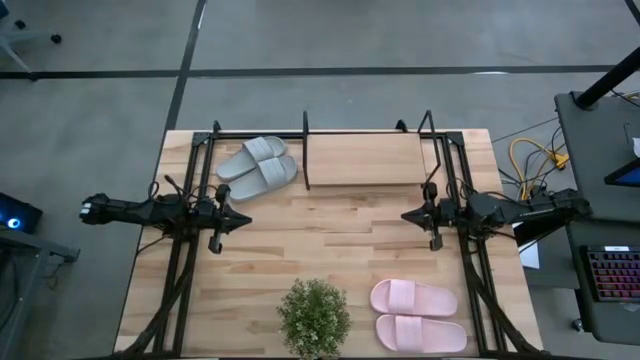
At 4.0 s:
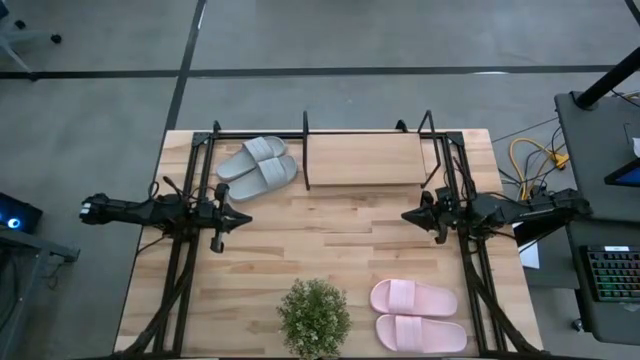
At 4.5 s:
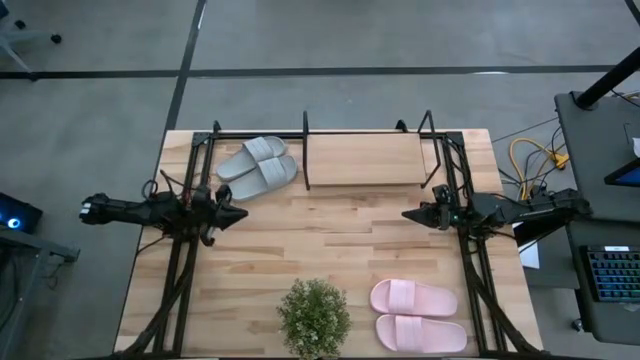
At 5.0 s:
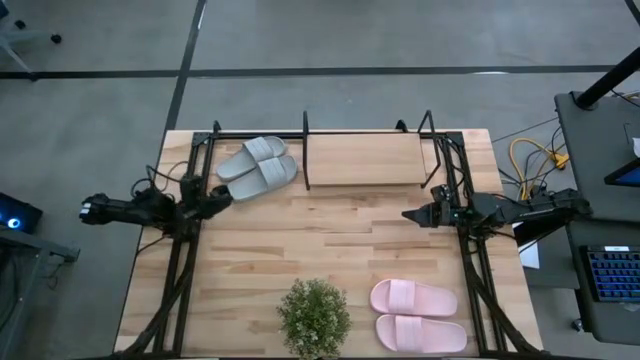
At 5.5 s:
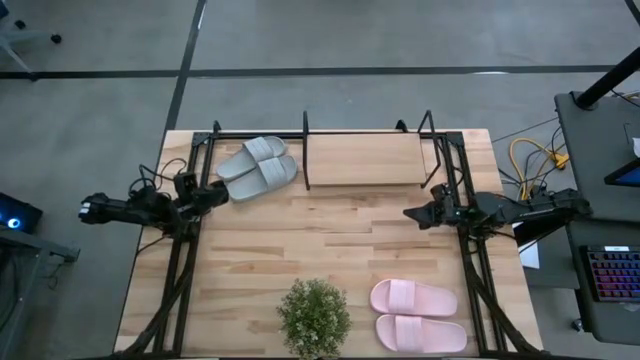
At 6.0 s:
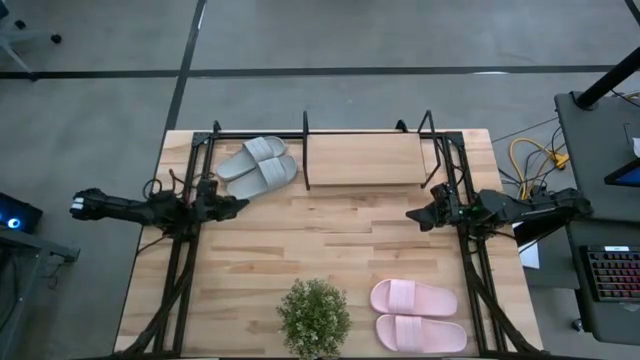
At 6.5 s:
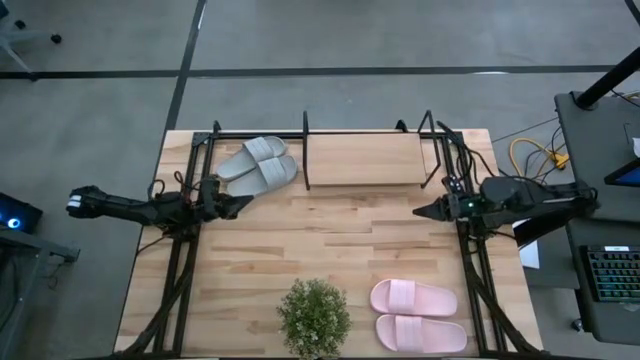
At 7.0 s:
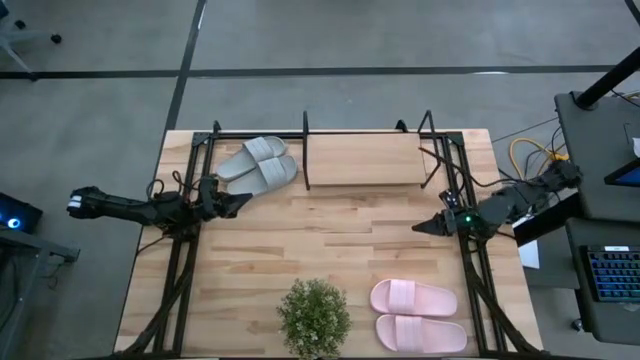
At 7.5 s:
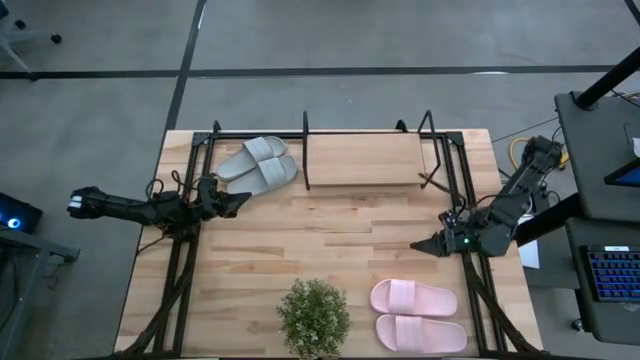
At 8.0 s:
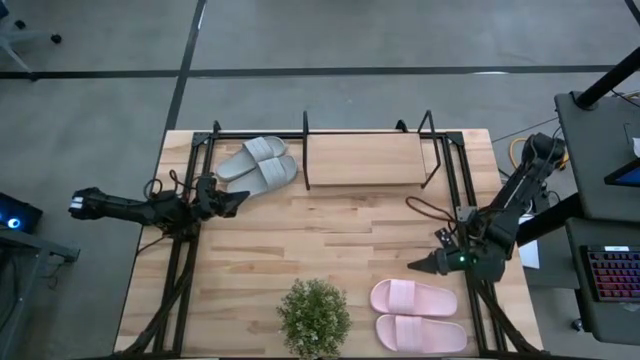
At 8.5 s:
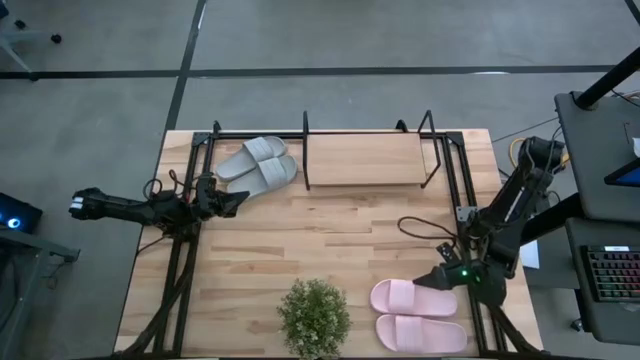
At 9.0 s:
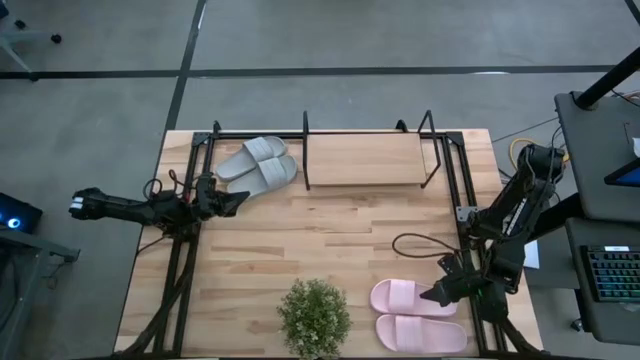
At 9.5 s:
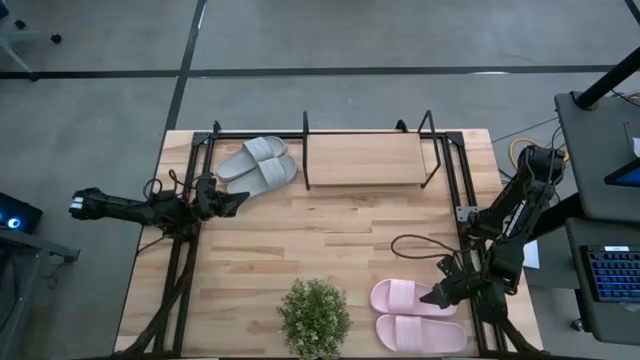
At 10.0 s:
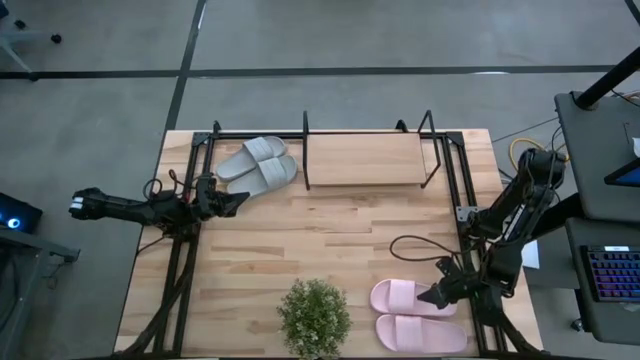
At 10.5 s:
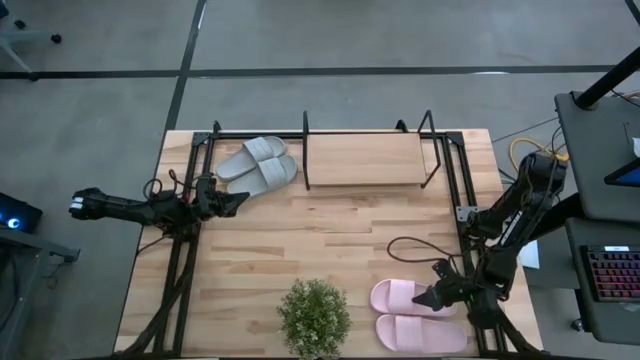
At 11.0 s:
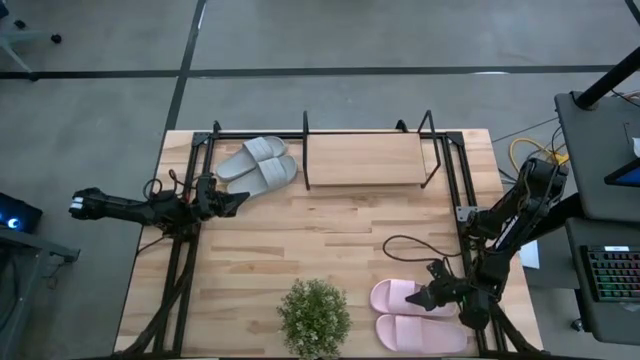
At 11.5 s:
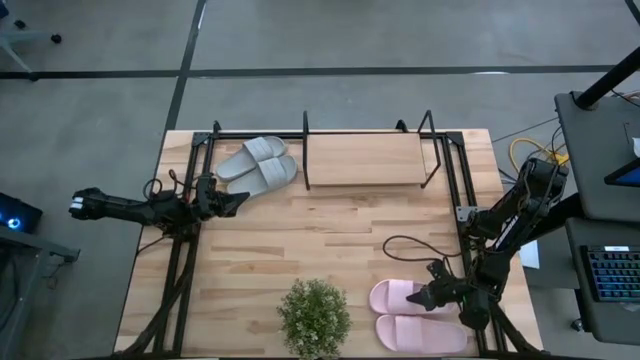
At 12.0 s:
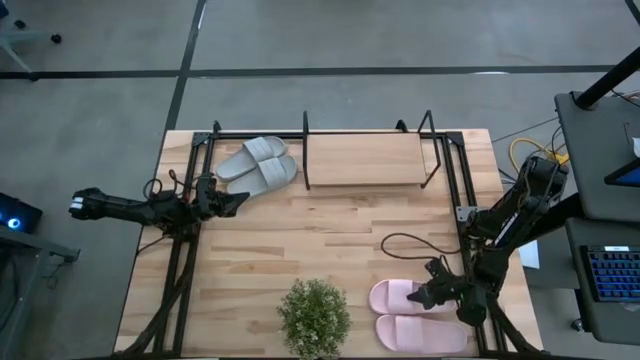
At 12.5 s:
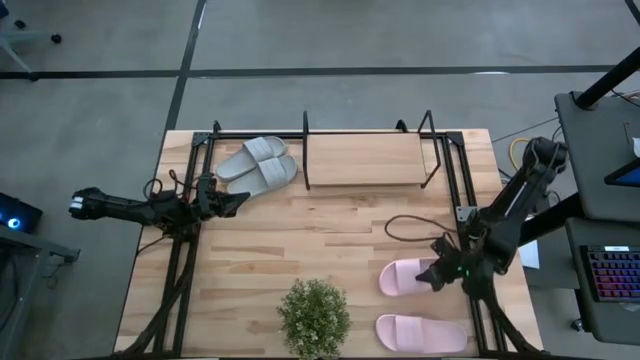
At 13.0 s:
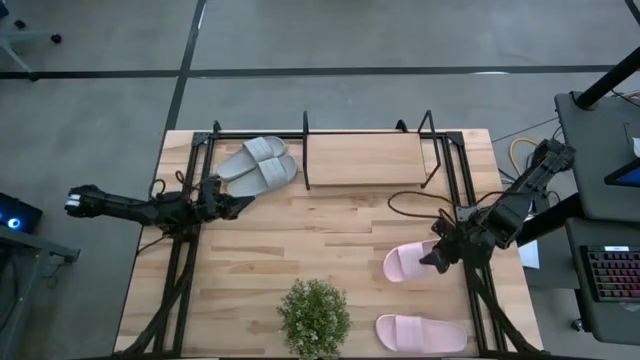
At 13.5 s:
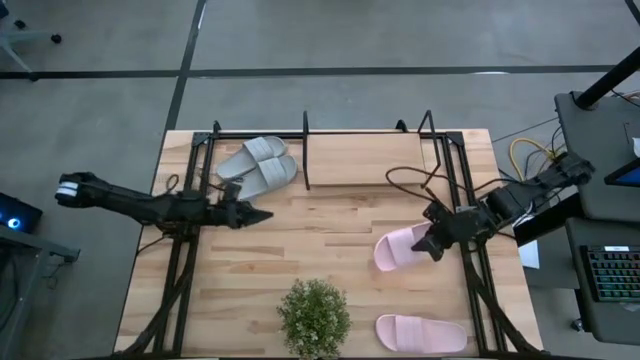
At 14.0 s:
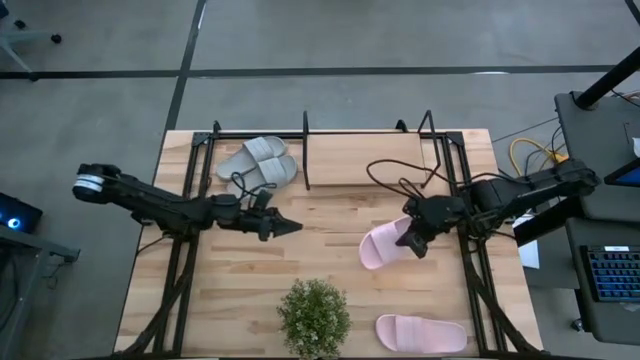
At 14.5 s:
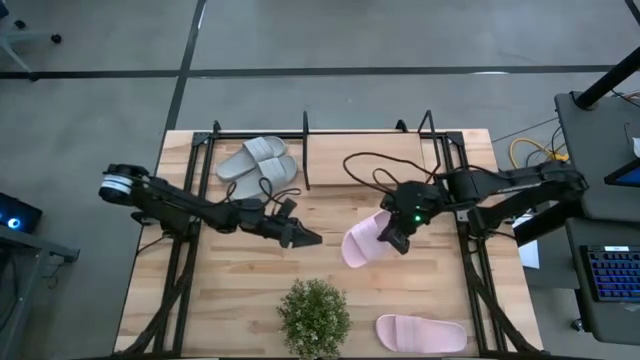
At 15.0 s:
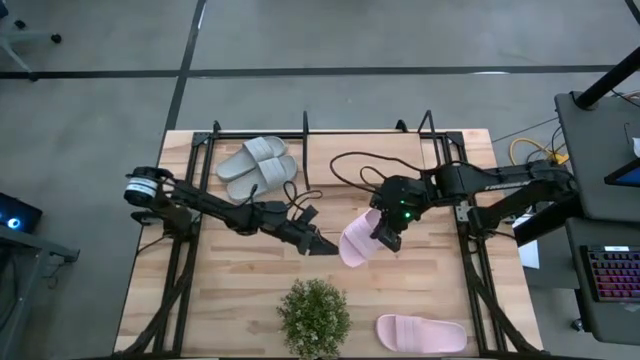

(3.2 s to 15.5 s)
Task: Pick and place slides into the shelf
Put the top pink slipper on the shelf

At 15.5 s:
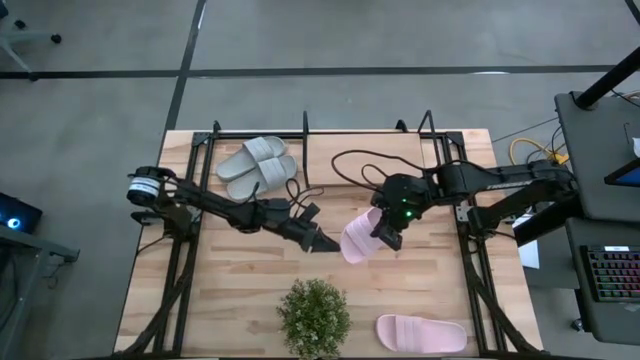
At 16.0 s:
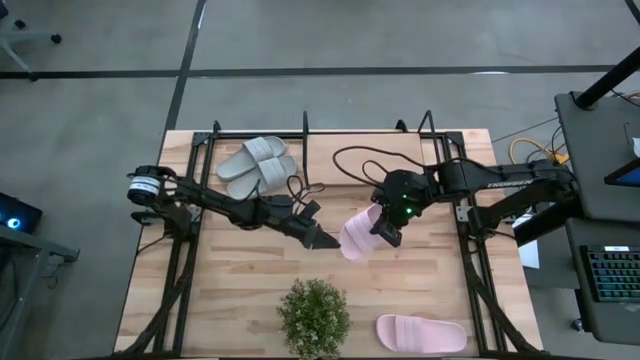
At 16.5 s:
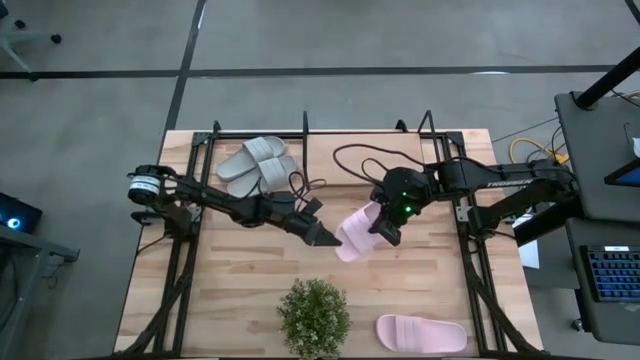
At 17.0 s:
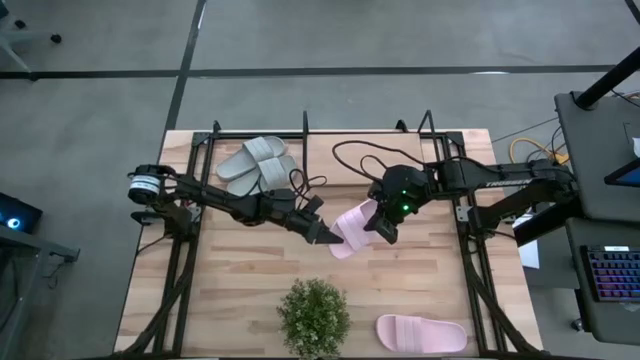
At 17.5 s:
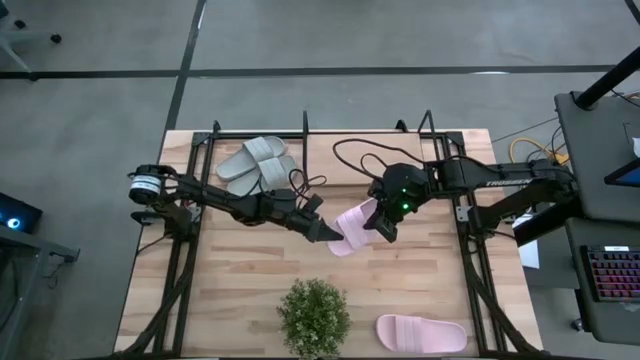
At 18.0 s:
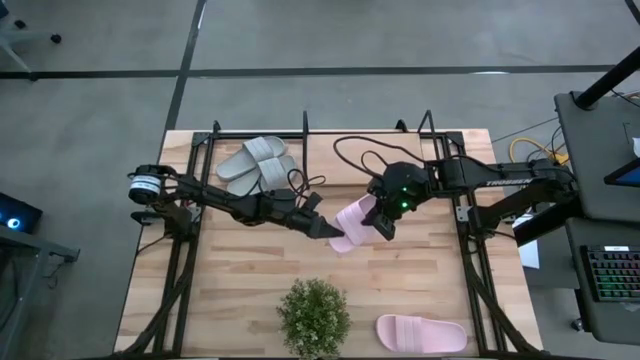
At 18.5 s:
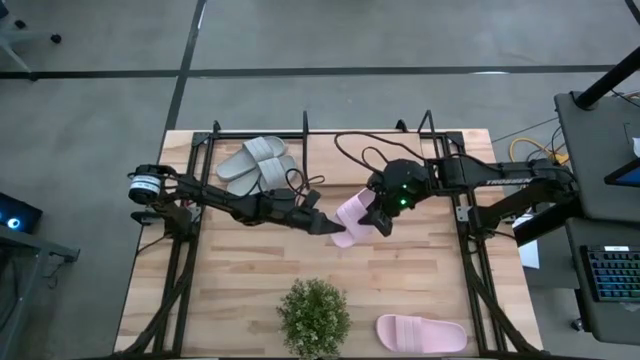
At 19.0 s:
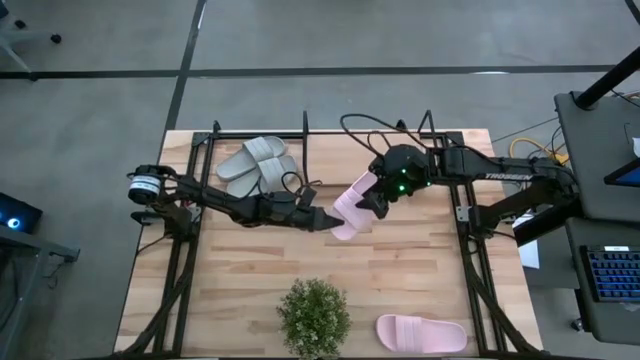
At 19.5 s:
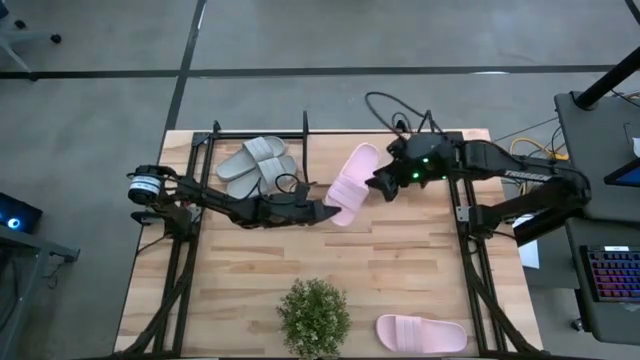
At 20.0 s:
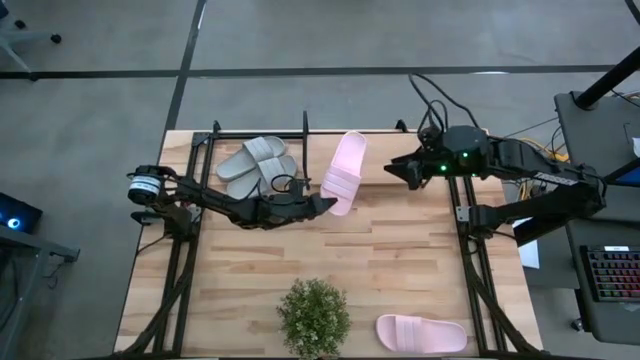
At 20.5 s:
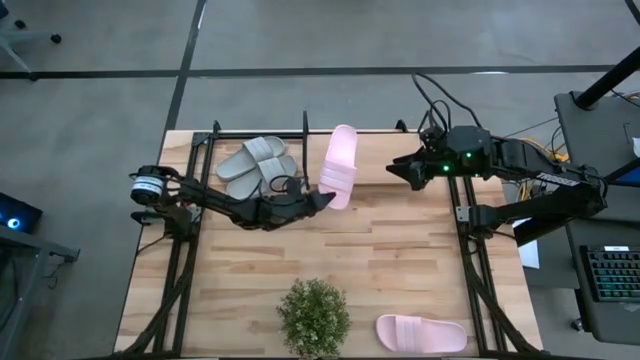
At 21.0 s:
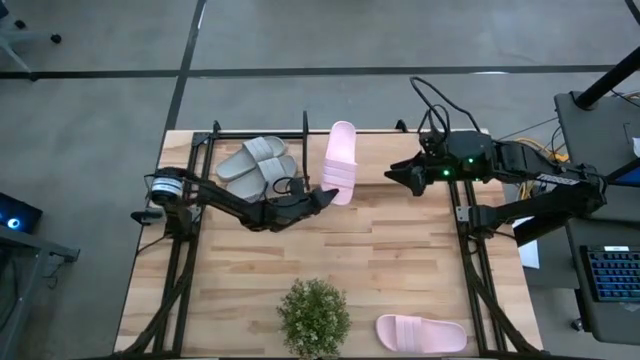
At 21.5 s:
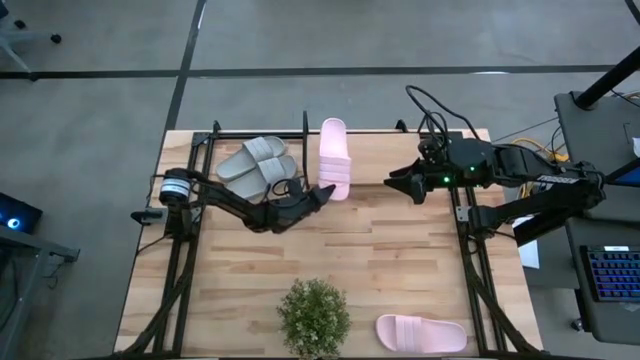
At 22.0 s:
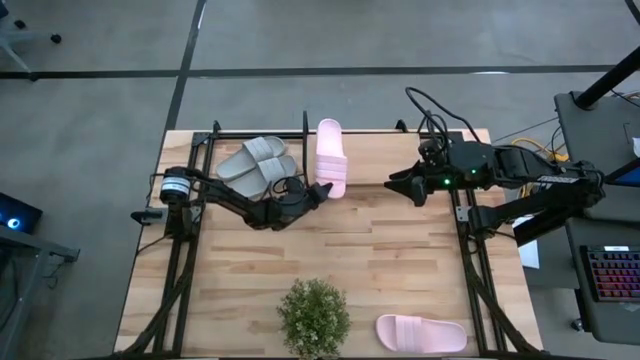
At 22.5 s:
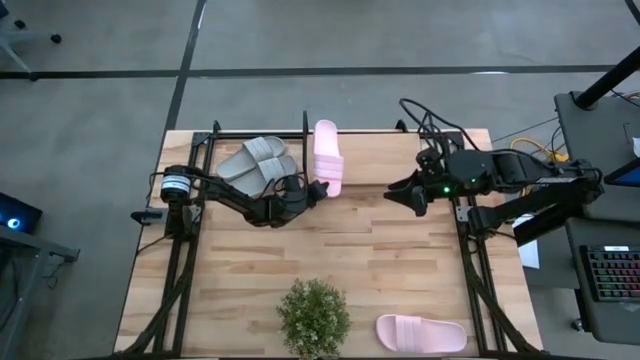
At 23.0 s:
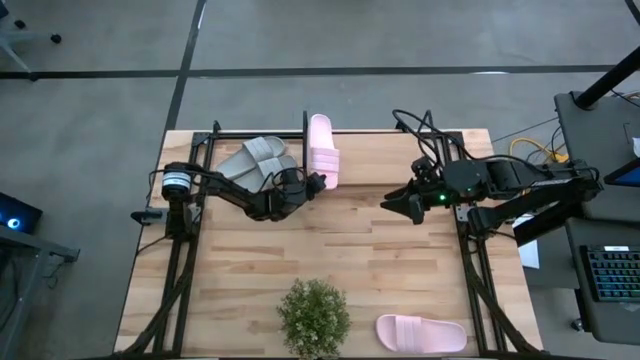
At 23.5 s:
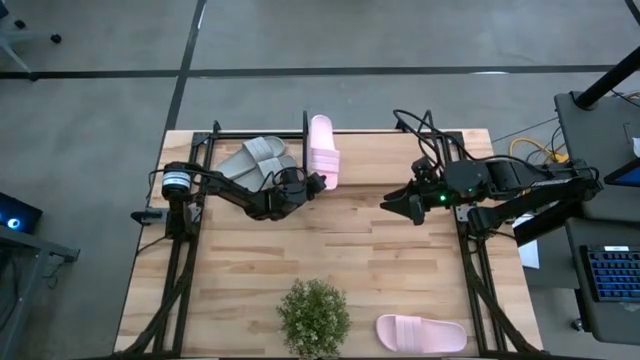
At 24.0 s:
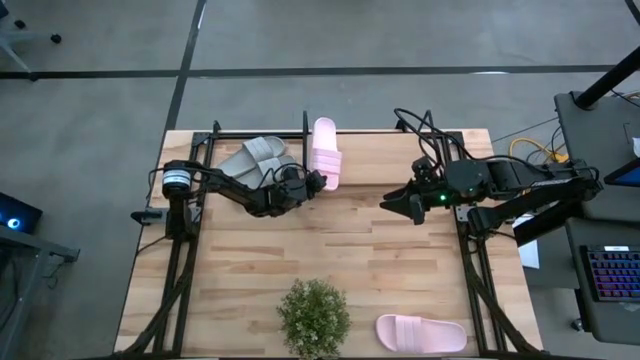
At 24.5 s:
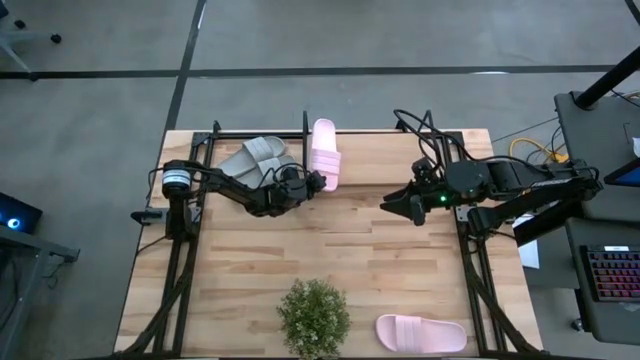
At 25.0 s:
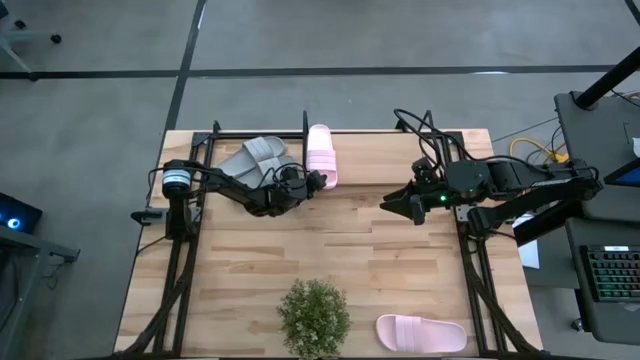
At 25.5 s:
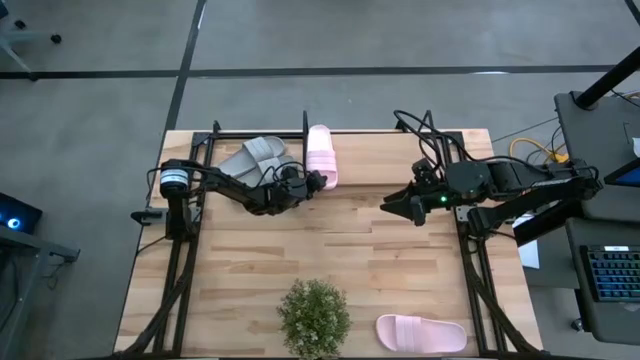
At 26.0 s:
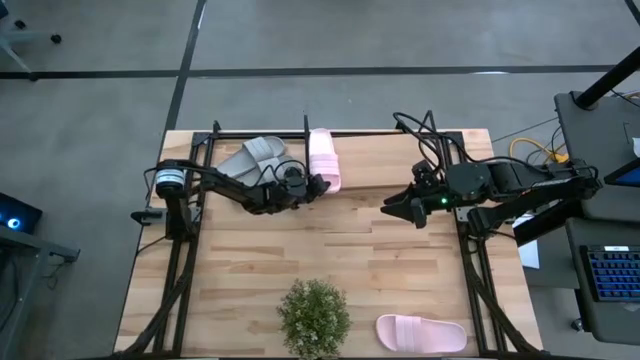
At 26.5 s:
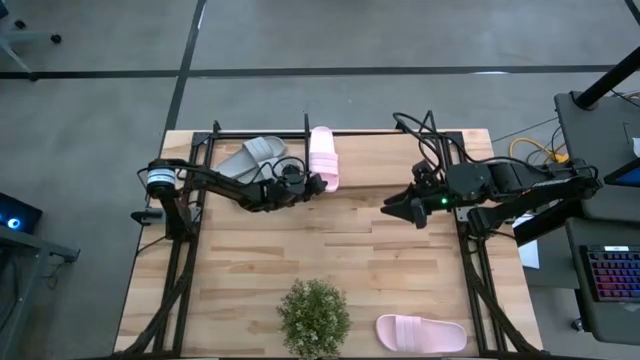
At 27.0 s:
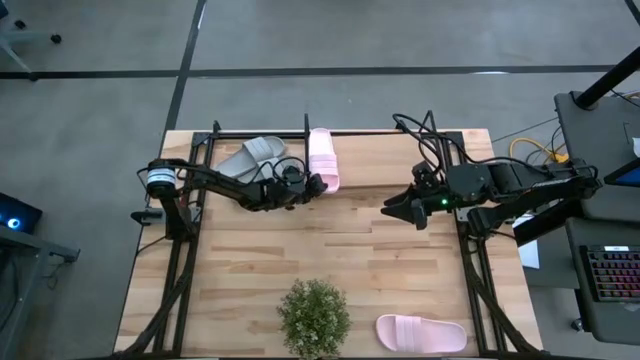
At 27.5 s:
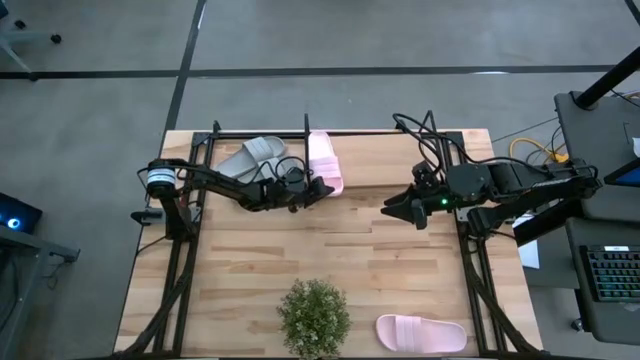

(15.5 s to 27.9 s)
Put the top pink slipper on the shelf
